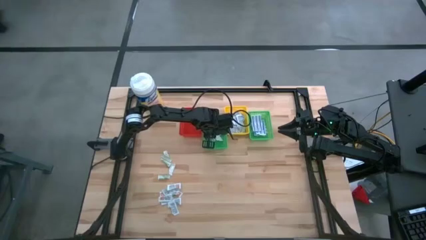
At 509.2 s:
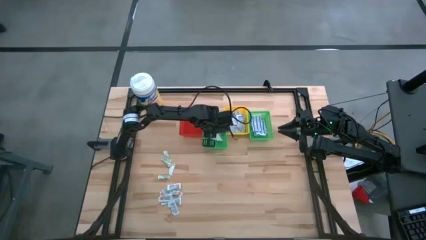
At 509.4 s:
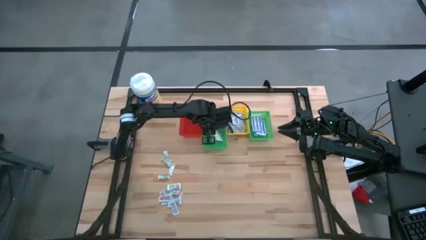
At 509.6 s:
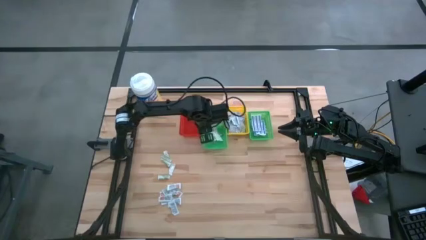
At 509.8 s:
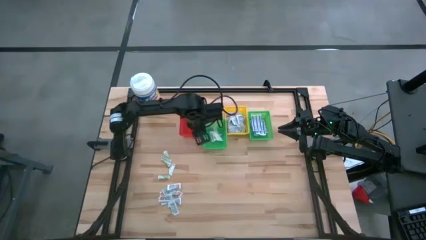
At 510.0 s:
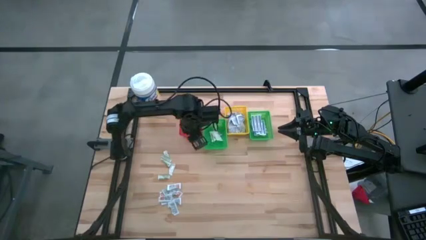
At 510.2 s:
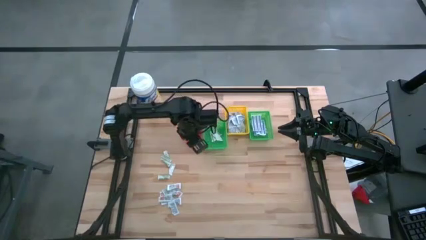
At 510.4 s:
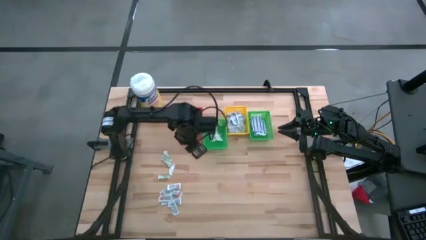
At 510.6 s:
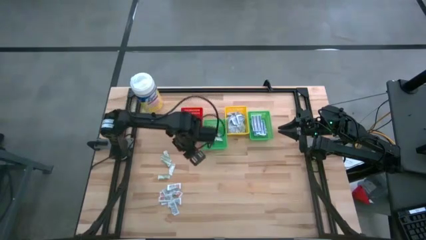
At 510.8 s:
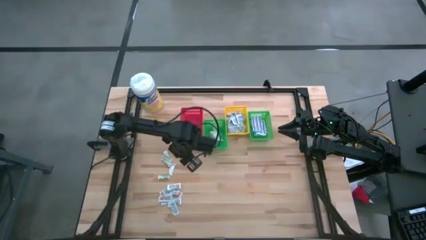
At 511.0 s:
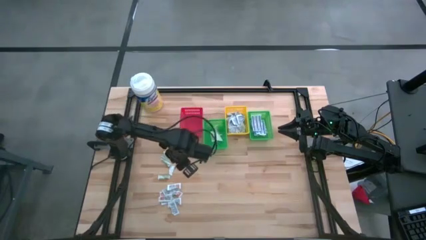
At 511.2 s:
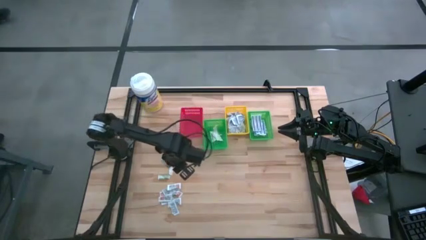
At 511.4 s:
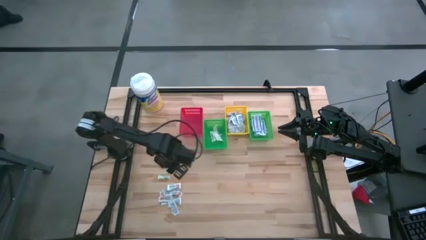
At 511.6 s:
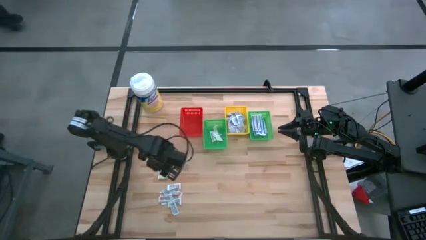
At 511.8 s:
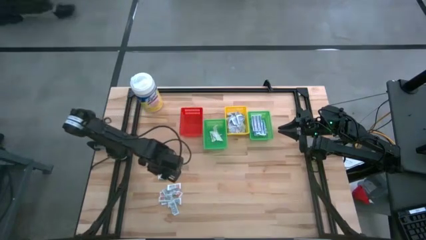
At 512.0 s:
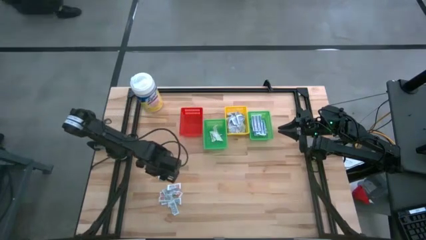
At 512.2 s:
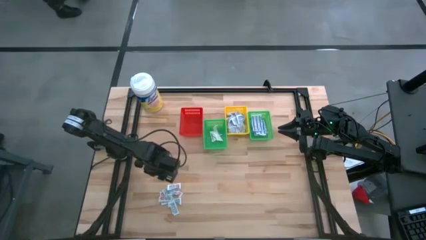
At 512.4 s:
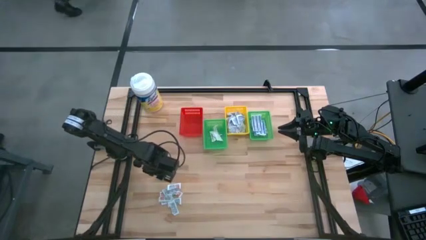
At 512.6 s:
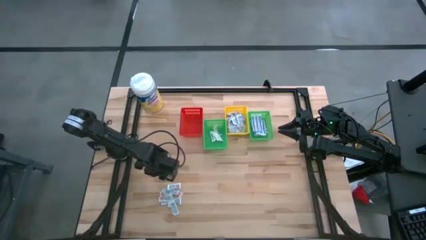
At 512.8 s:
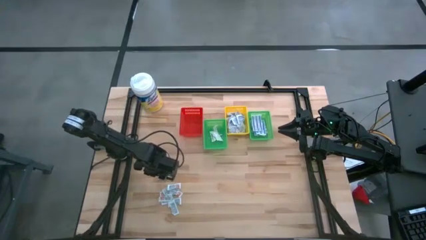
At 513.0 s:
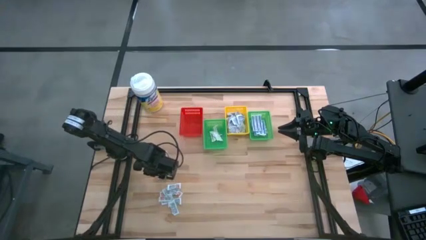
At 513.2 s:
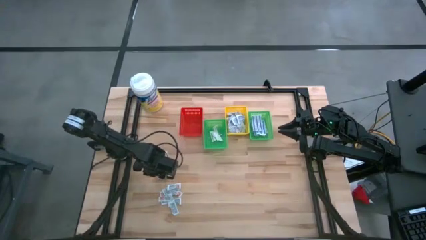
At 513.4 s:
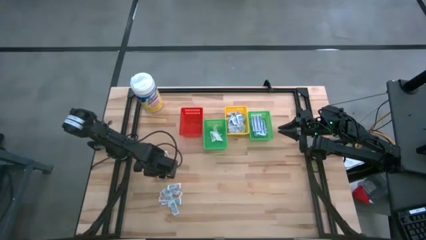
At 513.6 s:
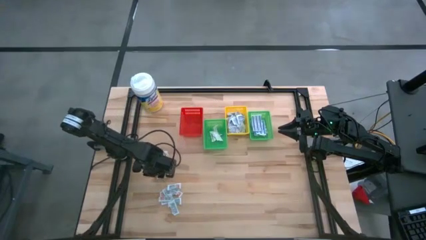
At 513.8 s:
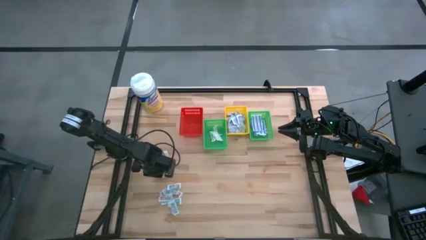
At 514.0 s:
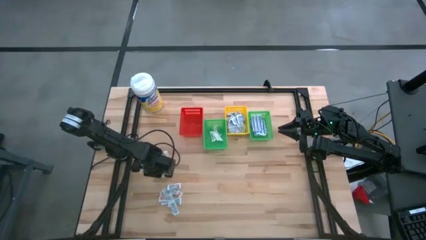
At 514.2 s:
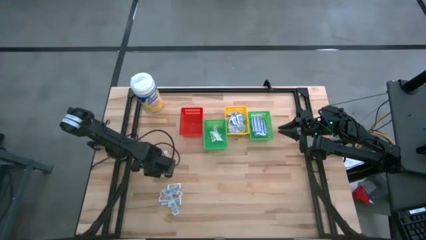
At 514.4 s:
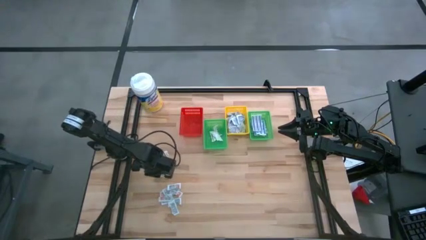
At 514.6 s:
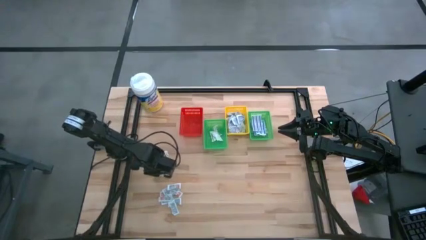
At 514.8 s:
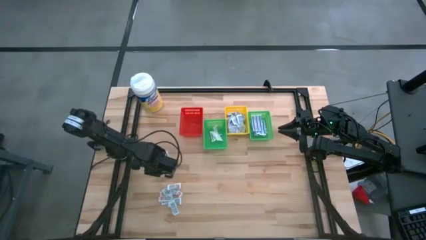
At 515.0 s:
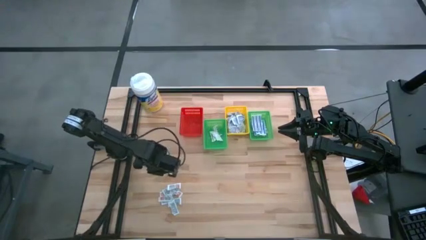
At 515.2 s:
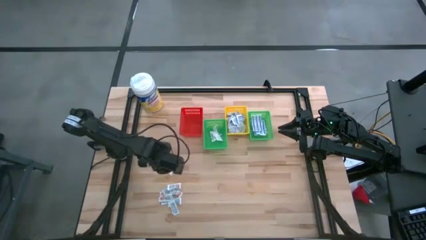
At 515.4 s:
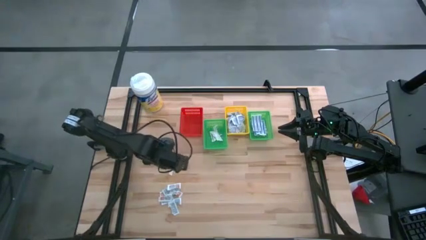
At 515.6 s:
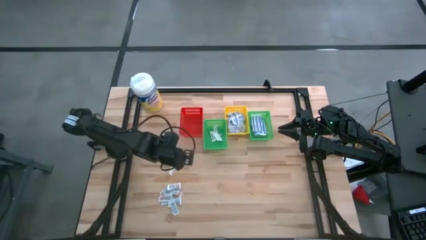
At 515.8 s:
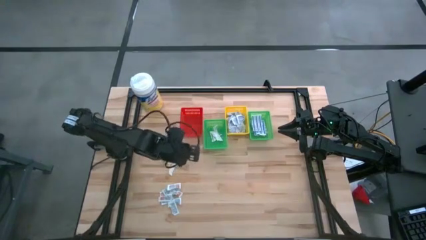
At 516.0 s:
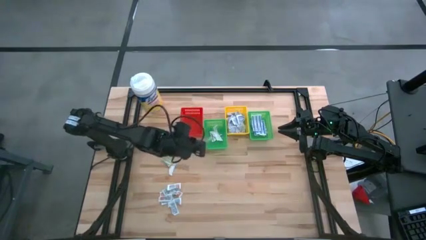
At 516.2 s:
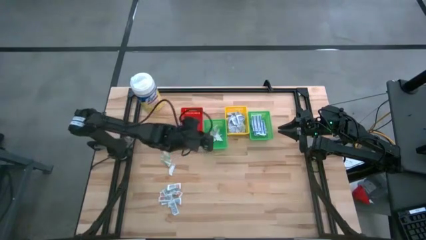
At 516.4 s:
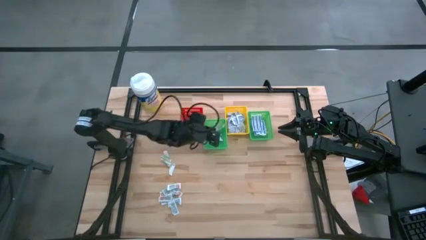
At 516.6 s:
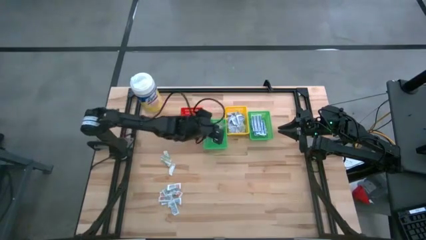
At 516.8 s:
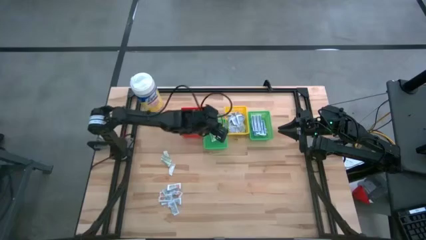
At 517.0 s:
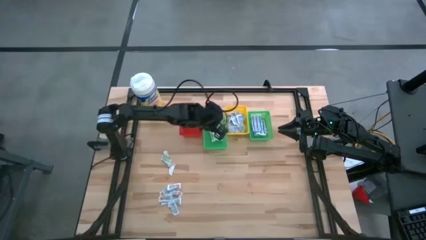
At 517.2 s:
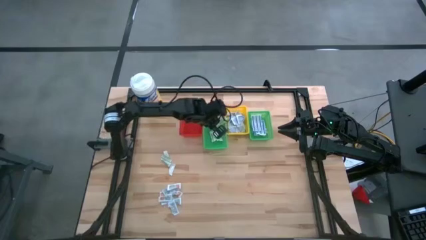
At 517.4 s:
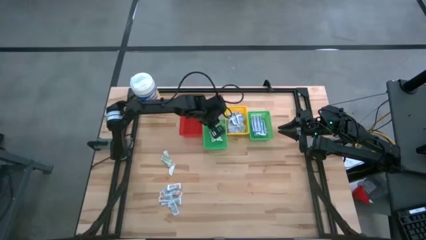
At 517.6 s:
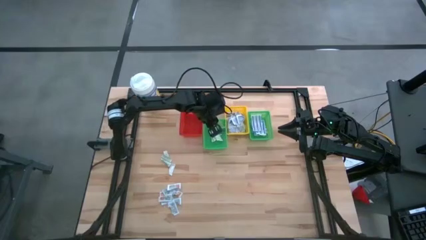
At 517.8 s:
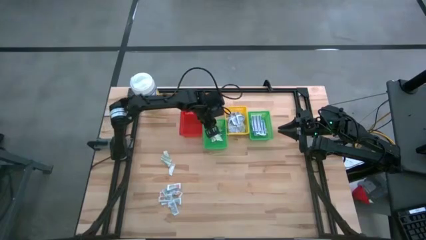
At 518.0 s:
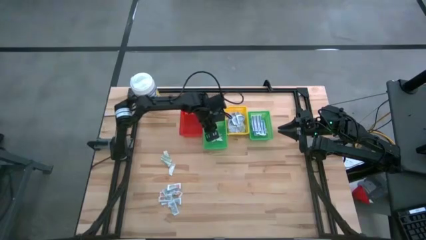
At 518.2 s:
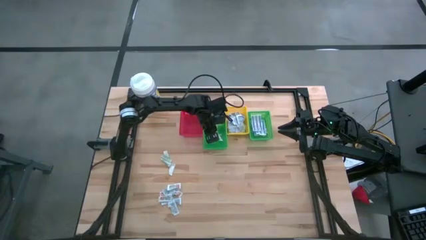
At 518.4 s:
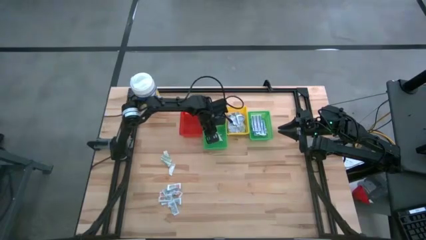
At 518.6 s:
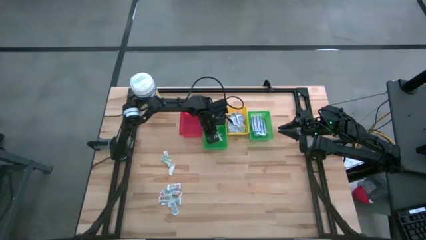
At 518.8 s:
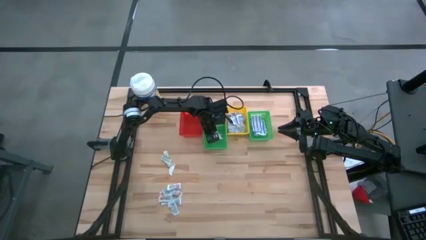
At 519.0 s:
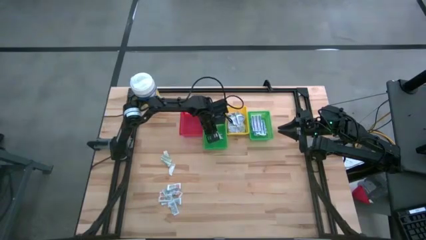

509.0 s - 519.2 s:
Task: Pick & Place First Aid Supplies
Put the bandage into the left green basket

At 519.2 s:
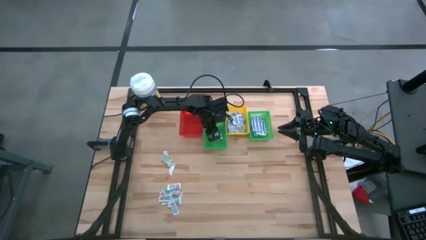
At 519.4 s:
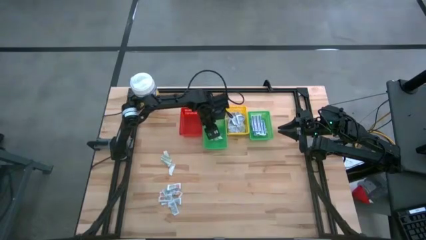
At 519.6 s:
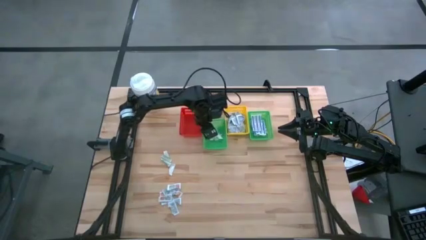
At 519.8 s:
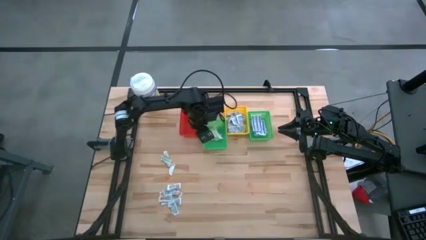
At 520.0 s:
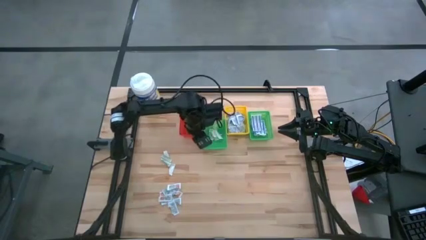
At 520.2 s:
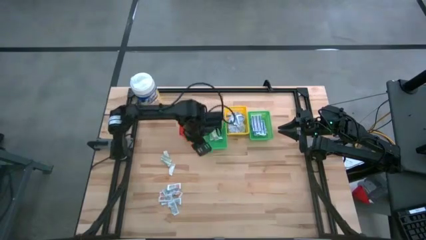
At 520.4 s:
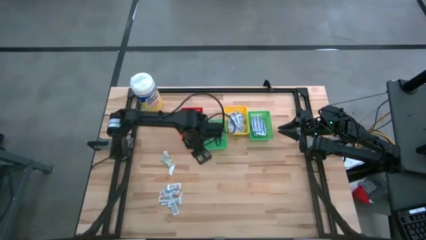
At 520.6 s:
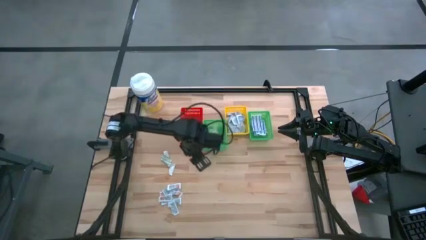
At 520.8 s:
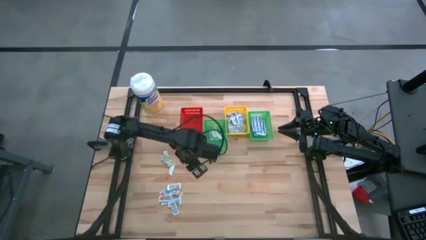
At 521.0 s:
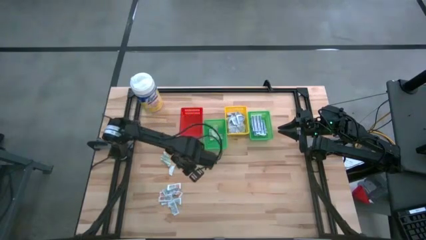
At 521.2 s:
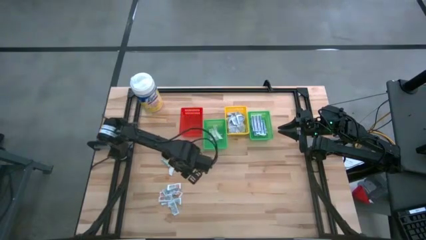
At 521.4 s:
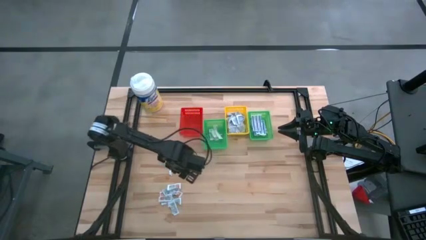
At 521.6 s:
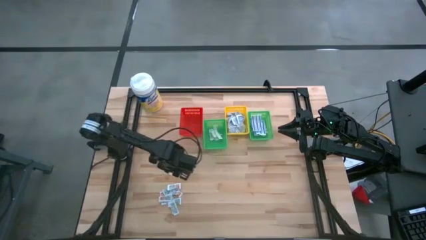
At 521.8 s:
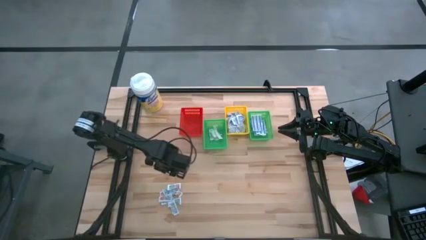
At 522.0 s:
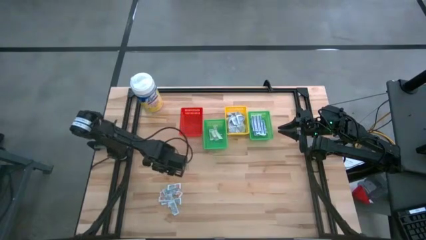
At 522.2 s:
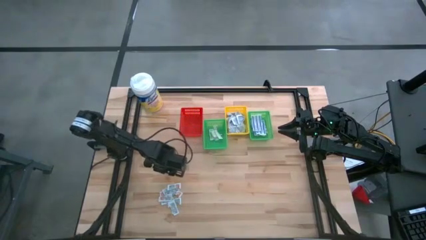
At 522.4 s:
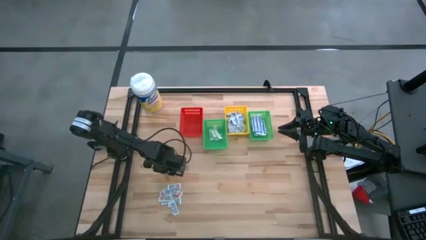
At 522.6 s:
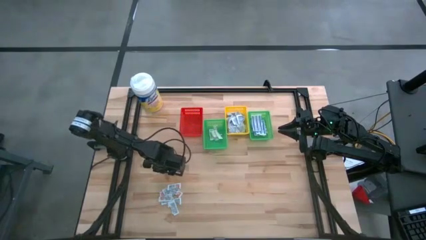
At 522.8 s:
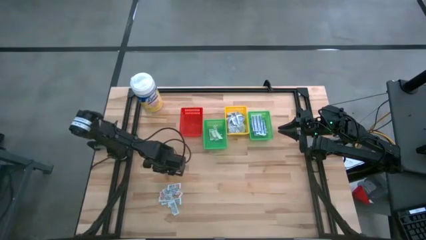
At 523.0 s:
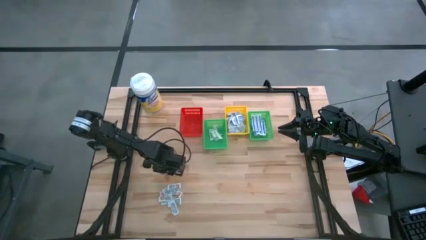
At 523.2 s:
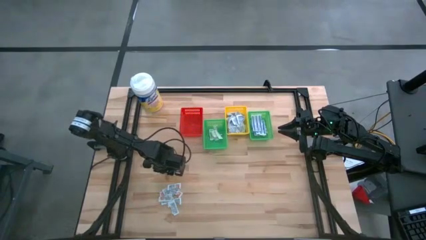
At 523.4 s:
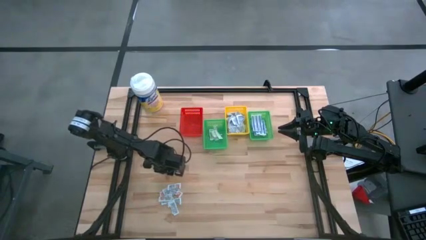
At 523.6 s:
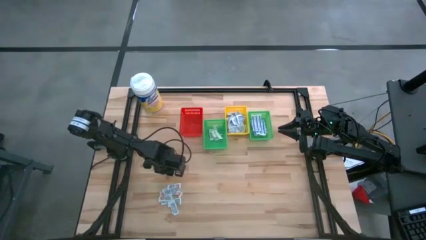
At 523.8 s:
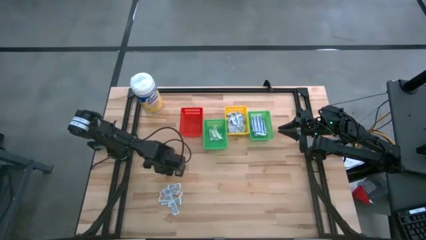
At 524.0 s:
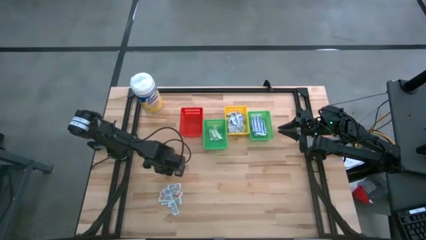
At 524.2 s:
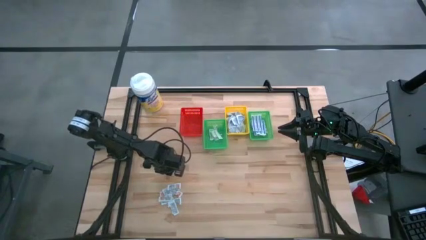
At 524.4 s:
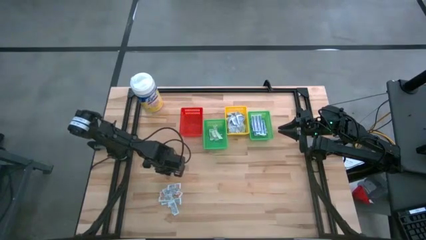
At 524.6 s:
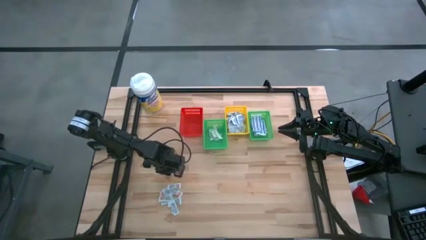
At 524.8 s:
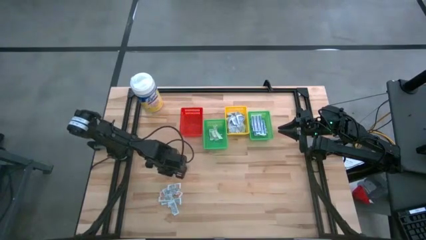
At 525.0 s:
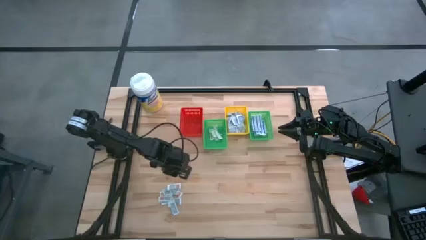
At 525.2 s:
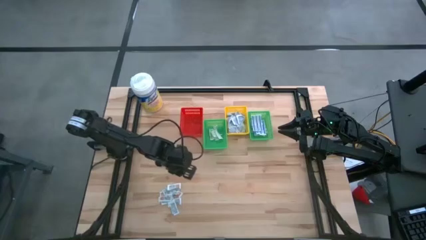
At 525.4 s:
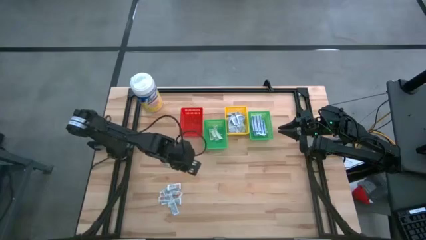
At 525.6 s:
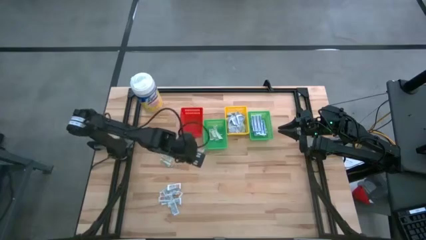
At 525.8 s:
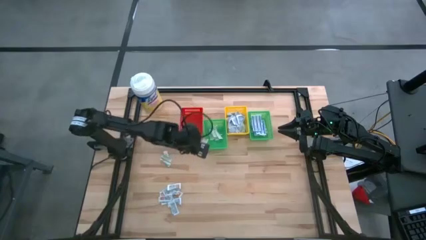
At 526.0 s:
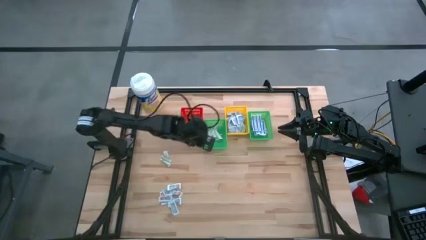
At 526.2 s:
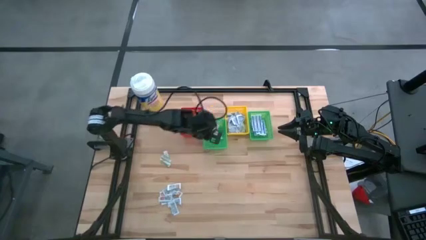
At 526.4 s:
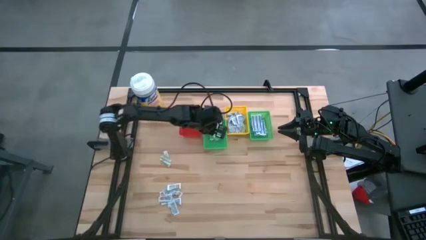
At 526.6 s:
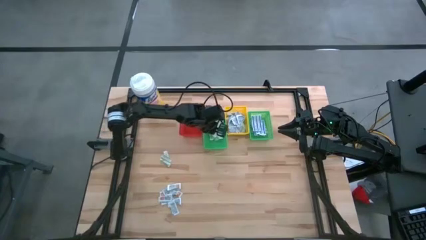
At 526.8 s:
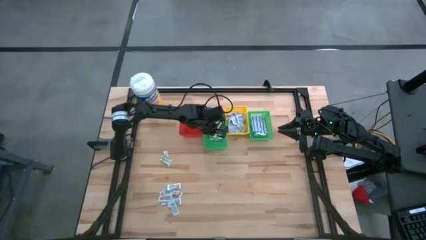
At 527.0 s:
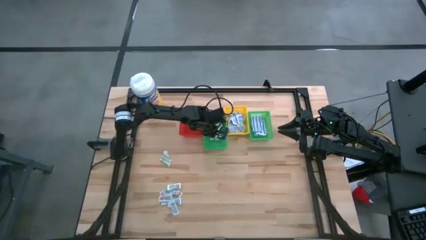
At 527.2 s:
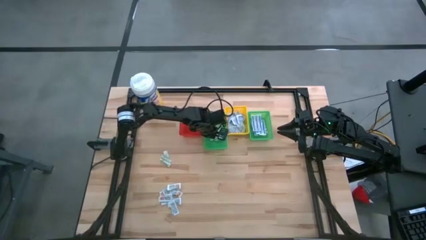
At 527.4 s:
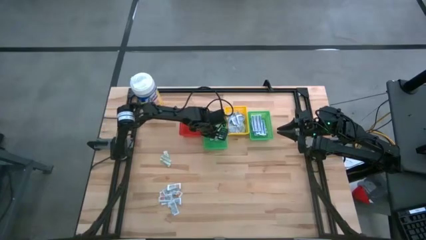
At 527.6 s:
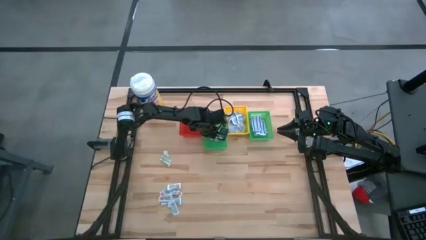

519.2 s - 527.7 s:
Put the bandage into the left green basket
